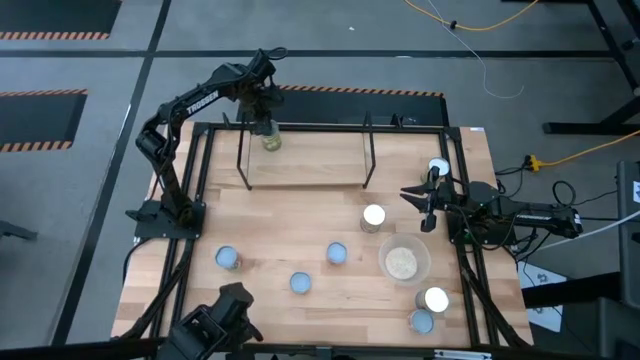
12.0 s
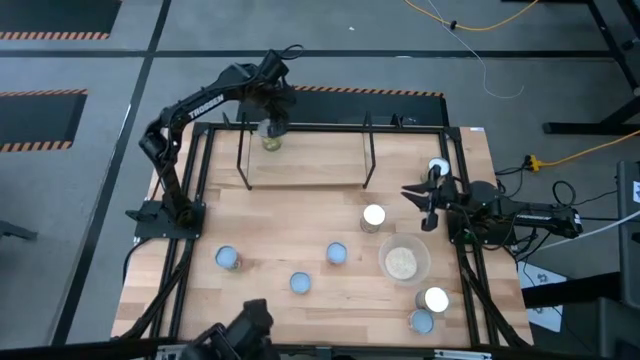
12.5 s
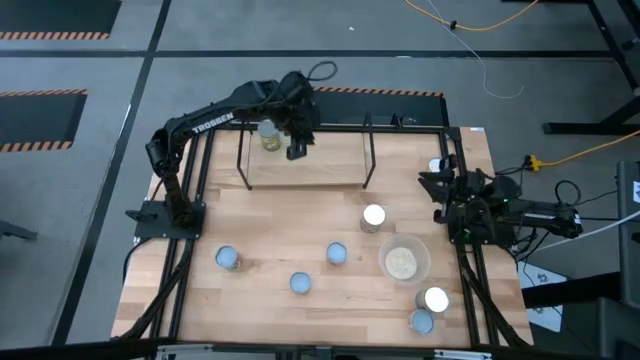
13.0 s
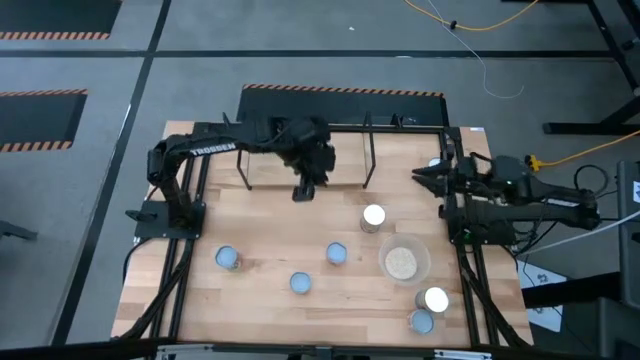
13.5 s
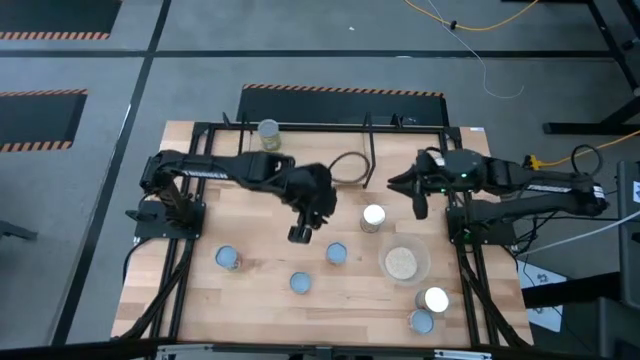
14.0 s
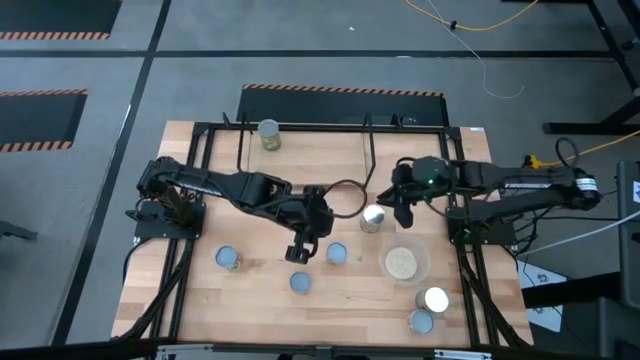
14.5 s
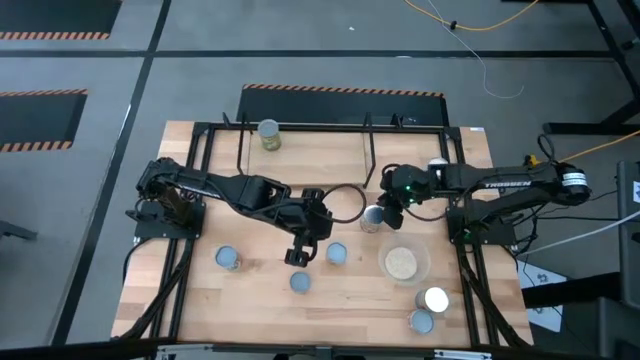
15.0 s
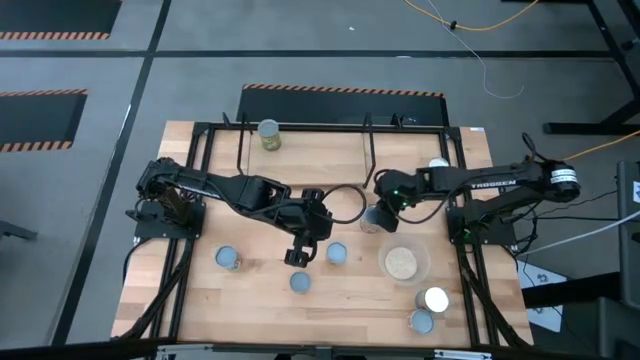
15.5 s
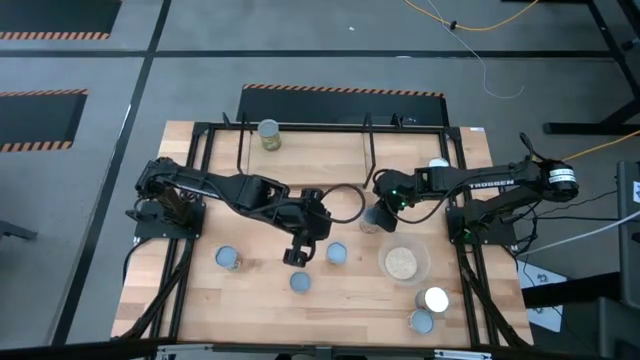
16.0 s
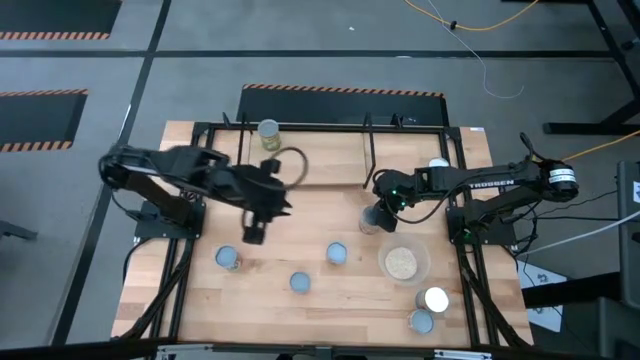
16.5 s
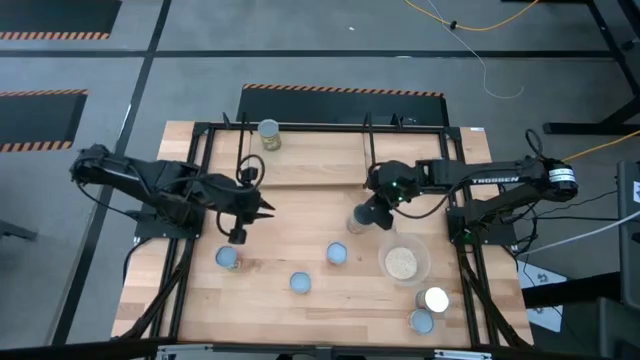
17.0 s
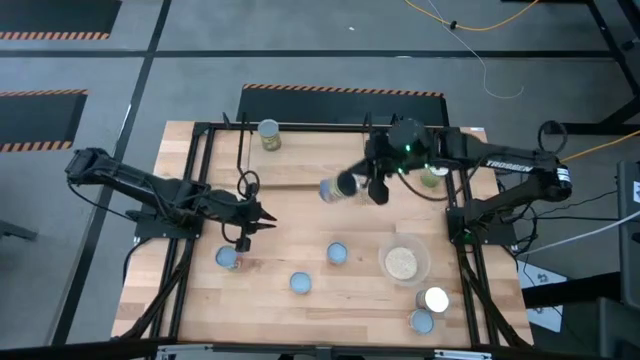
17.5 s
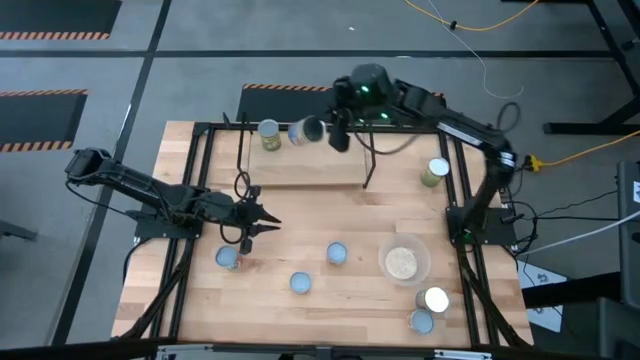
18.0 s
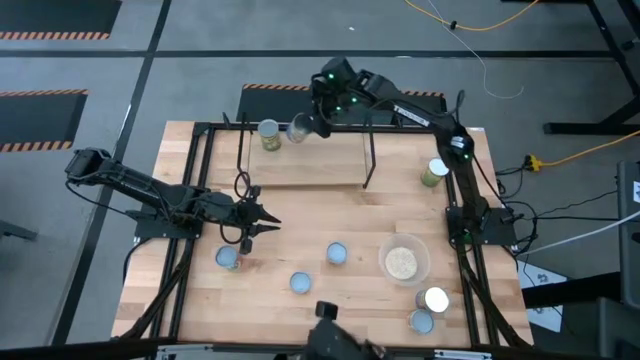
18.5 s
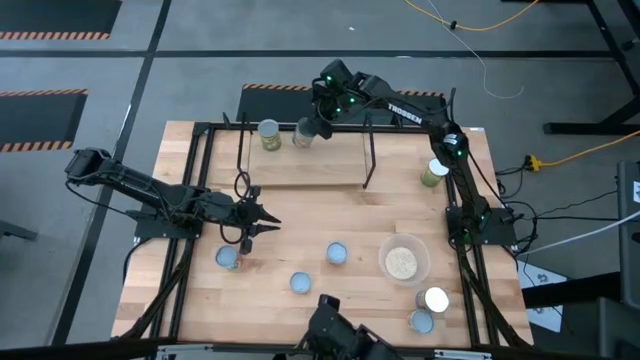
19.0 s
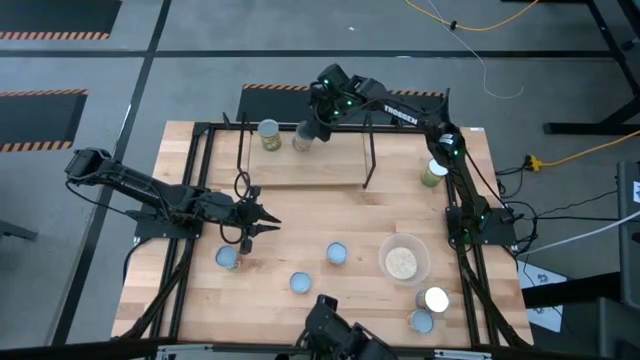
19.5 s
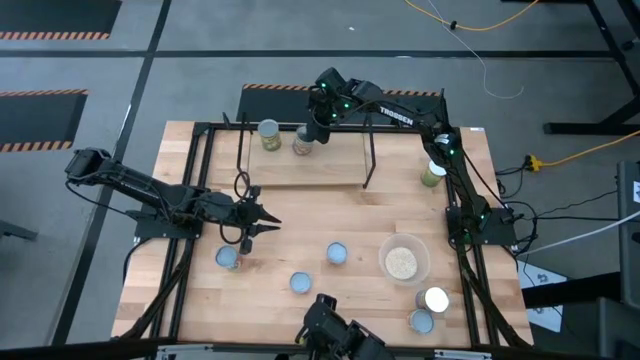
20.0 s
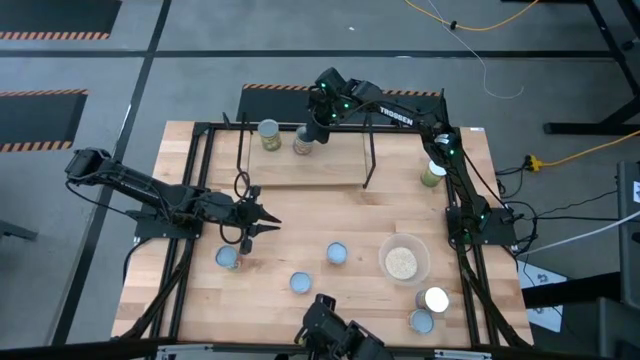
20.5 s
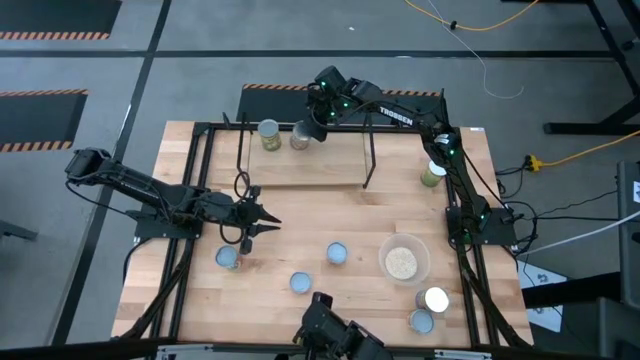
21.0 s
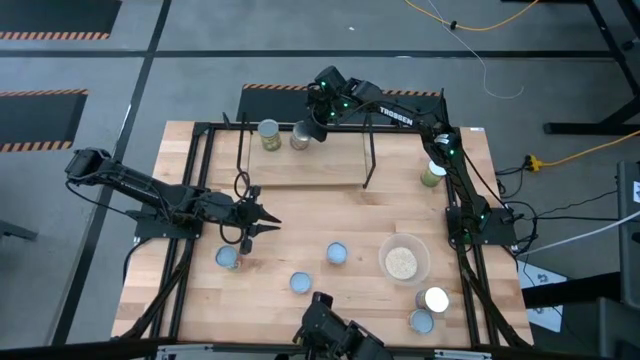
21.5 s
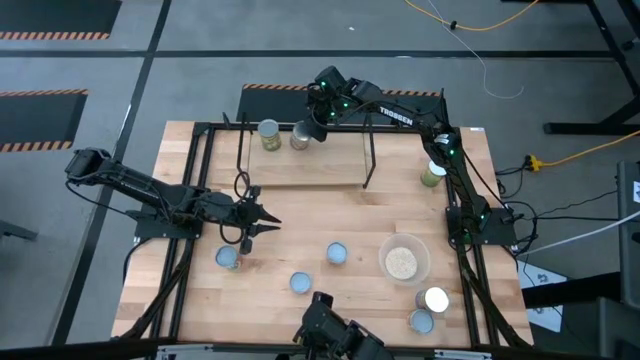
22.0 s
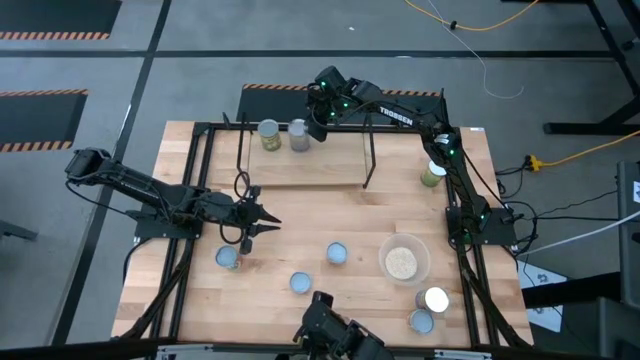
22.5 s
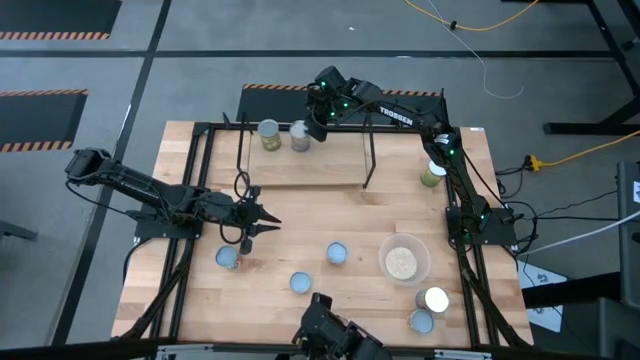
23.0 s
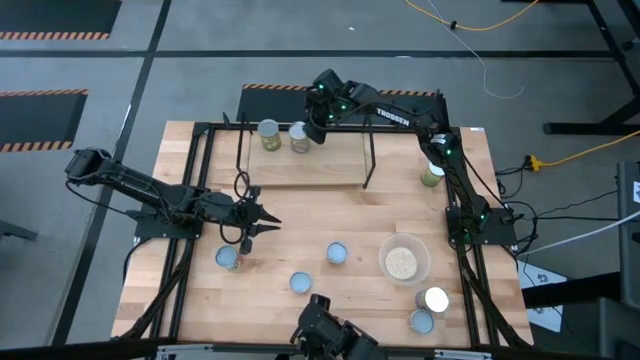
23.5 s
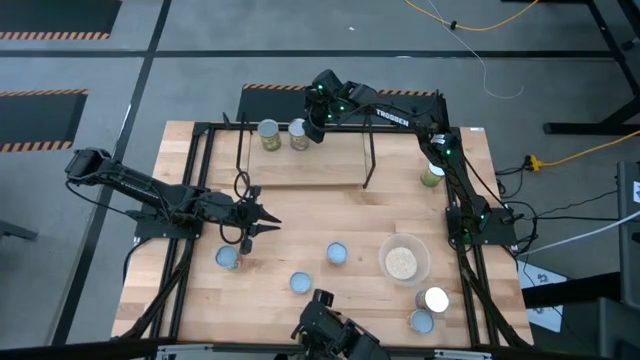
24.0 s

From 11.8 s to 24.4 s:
Task: Pick and place cans onto a shelf
Put the canned peaches on the shelf
